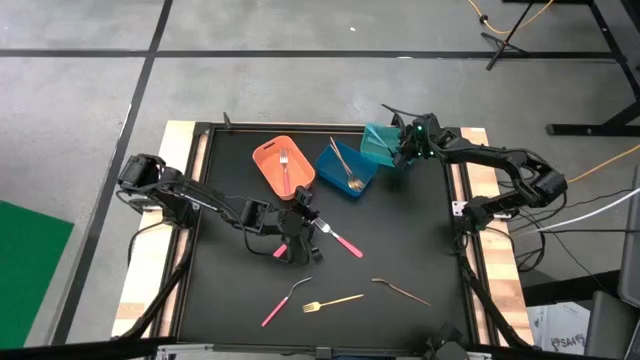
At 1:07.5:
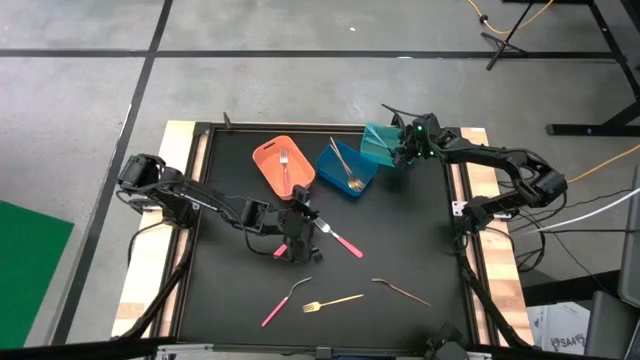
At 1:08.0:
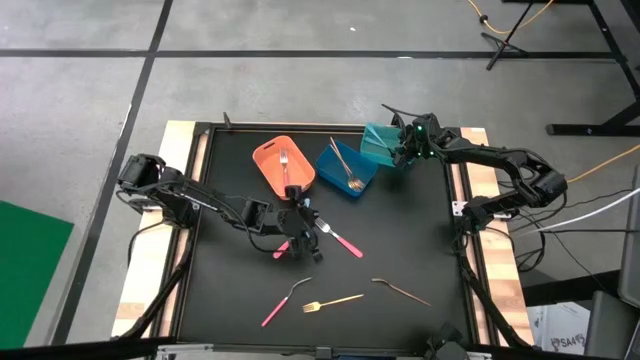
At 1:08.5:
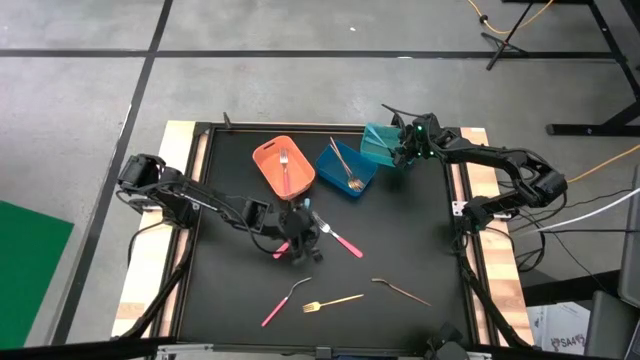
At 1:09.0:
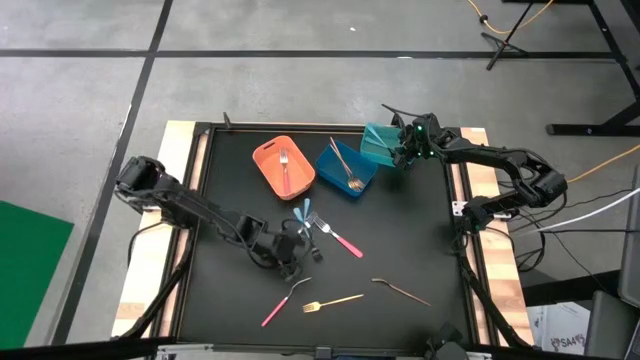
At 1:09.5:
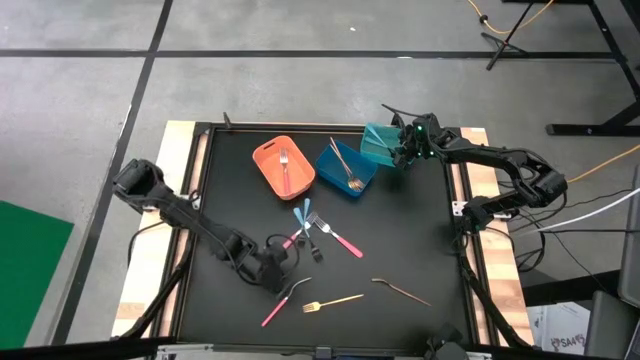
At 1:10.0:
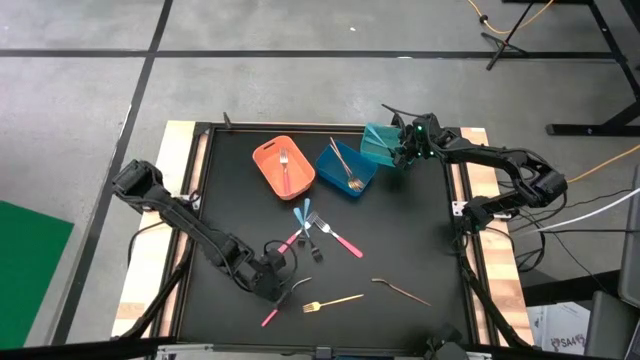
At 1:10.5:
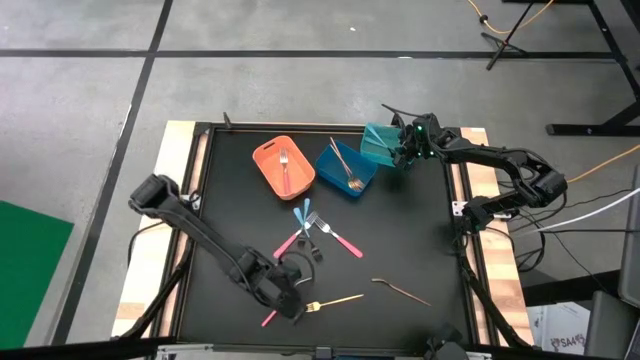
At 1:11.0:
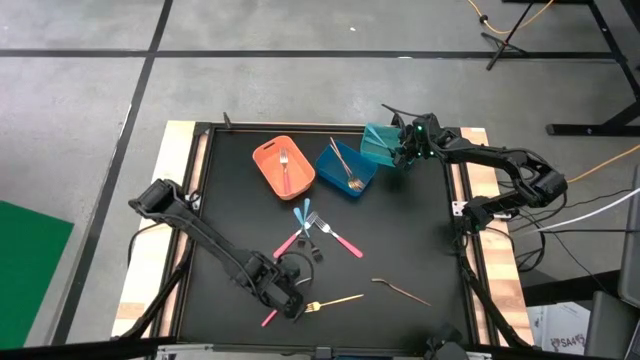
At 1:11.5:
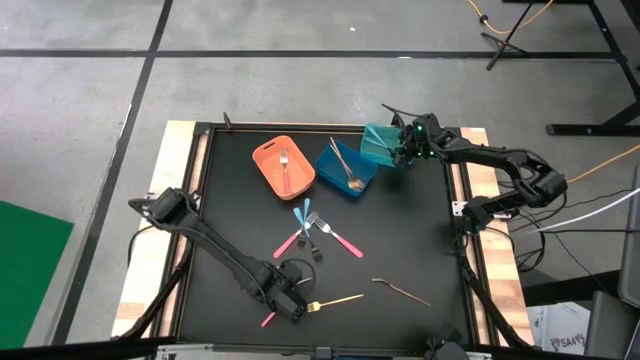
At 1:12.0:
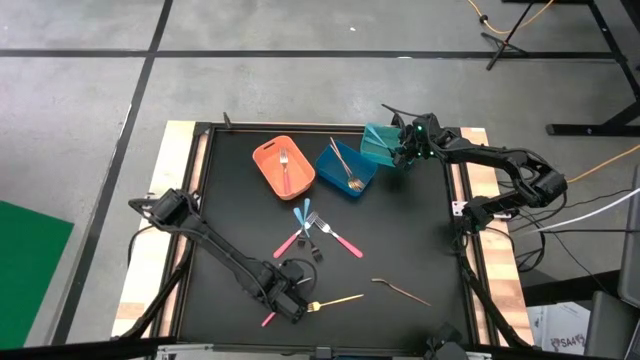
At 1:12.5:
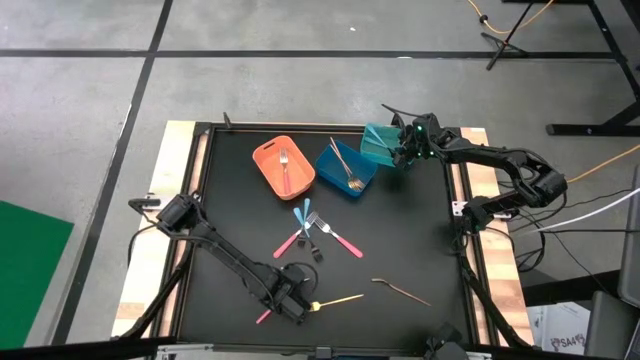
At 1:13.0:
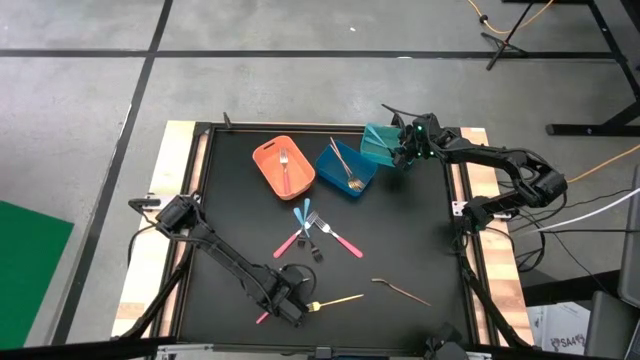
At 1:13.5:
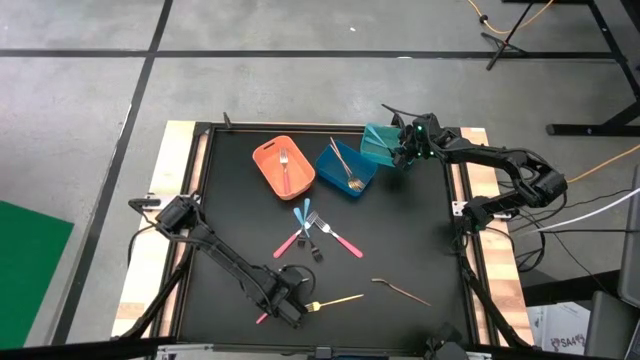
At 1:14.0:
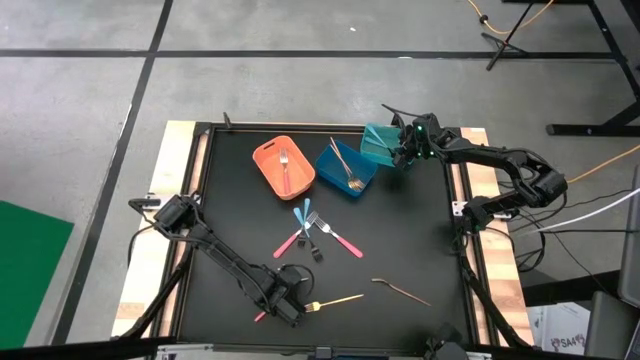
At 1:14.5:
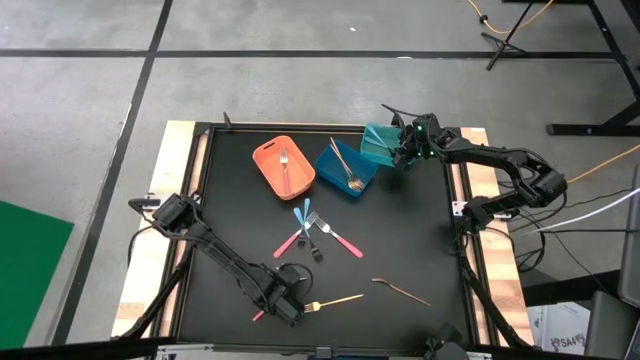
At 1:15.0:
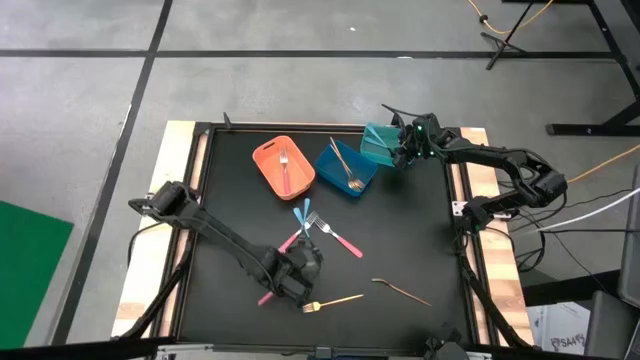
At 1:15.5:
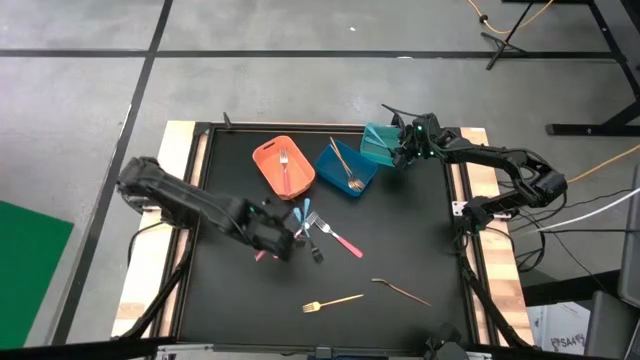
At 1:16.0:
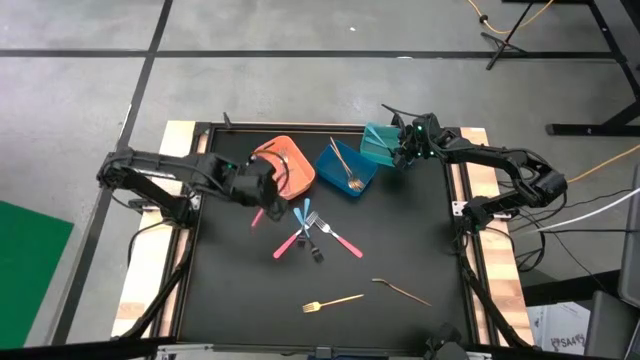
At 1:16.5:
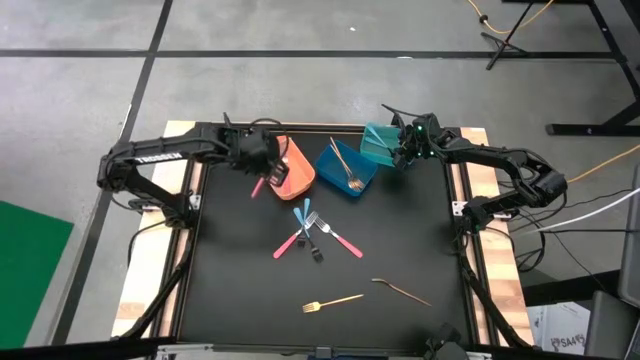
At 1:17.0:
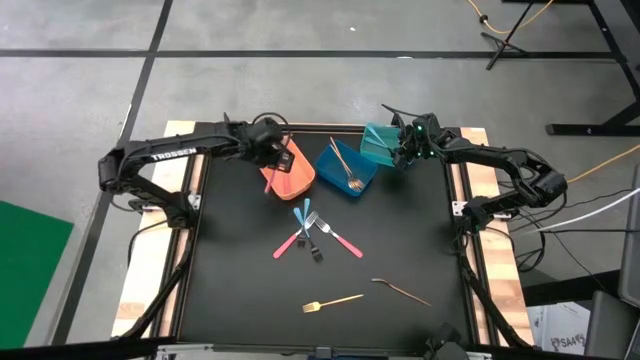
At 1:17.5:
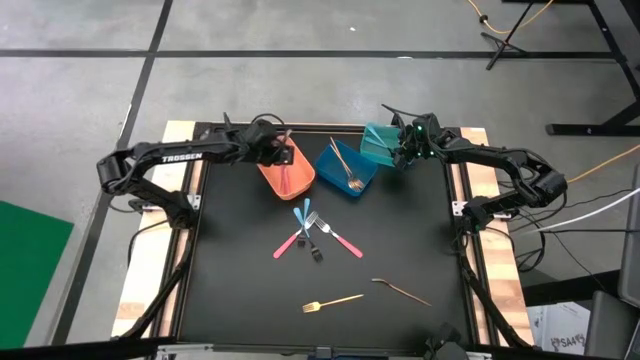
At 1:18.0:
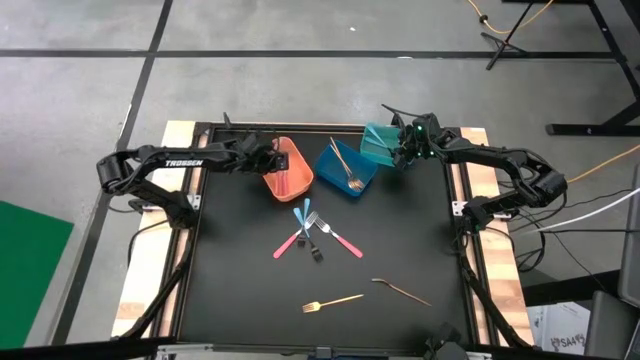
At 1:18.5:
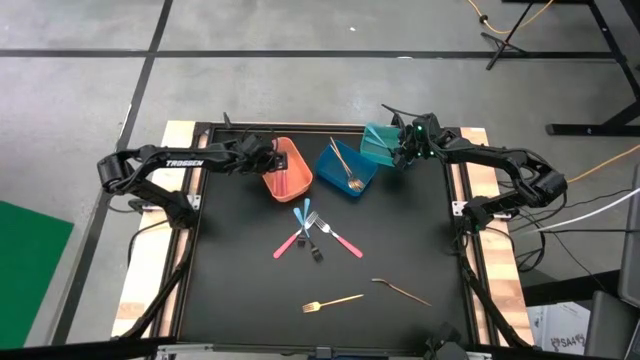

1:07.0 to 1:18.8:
Task: Sort silverware by color (type)
Put the pink fork into the orange bin

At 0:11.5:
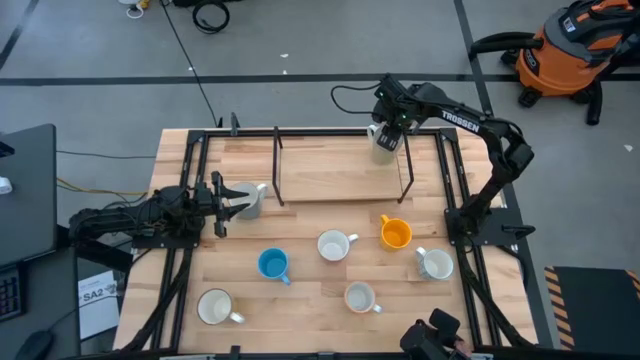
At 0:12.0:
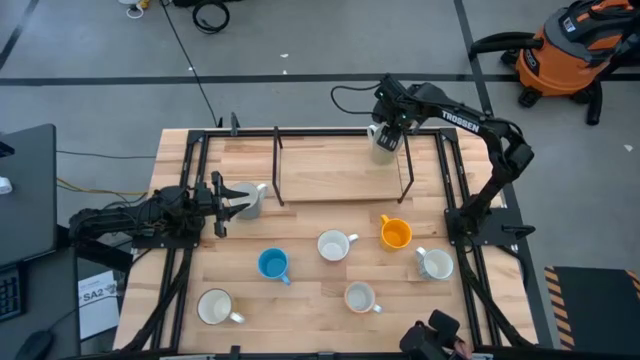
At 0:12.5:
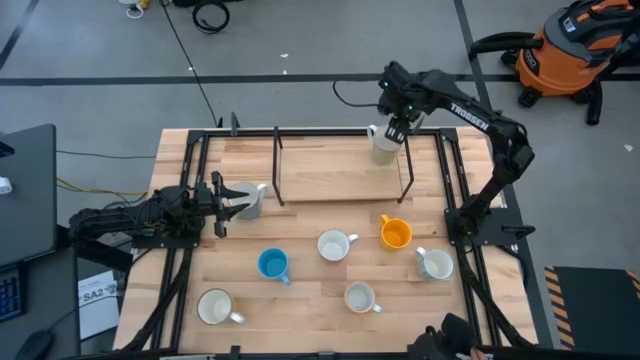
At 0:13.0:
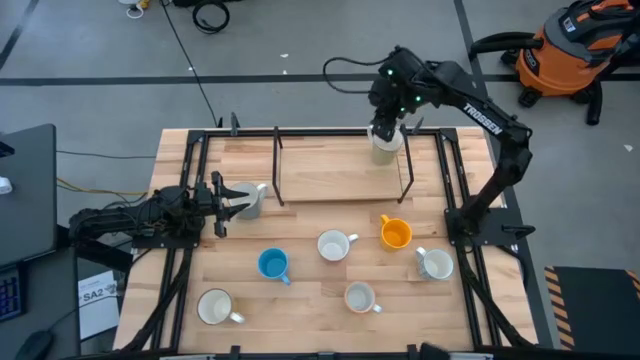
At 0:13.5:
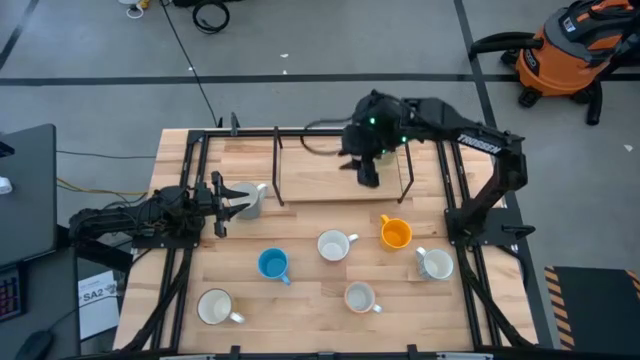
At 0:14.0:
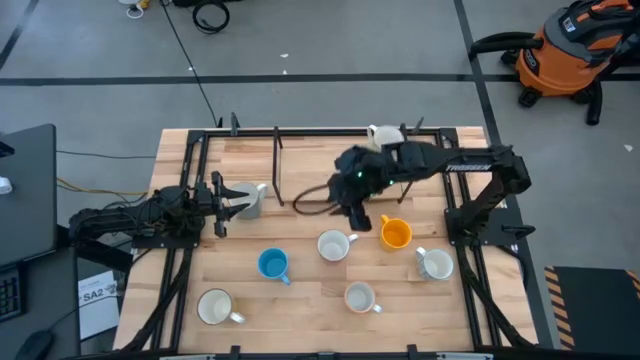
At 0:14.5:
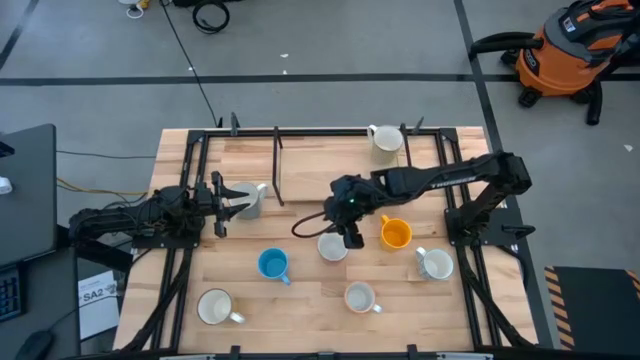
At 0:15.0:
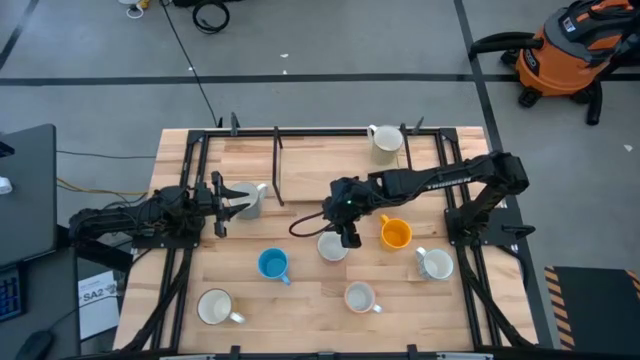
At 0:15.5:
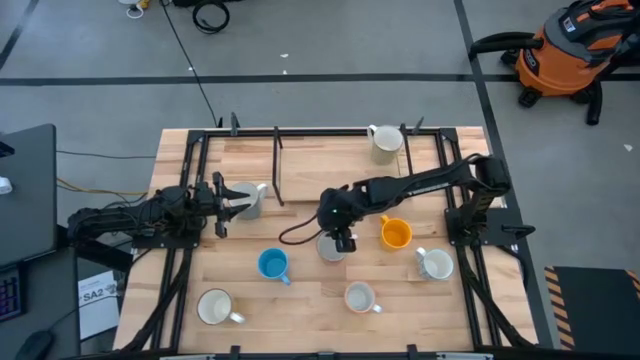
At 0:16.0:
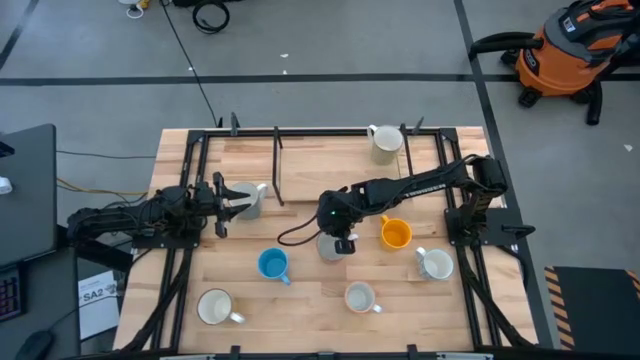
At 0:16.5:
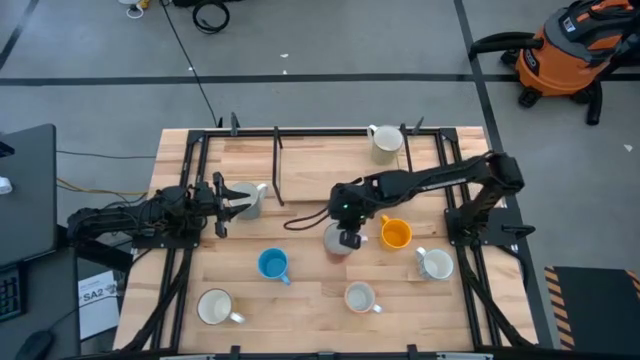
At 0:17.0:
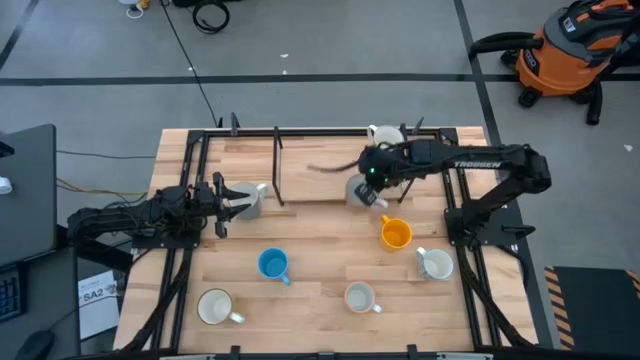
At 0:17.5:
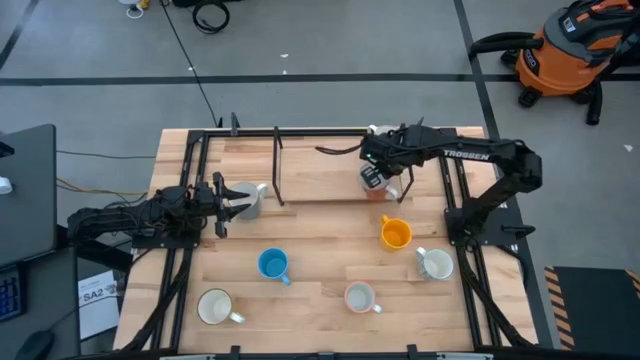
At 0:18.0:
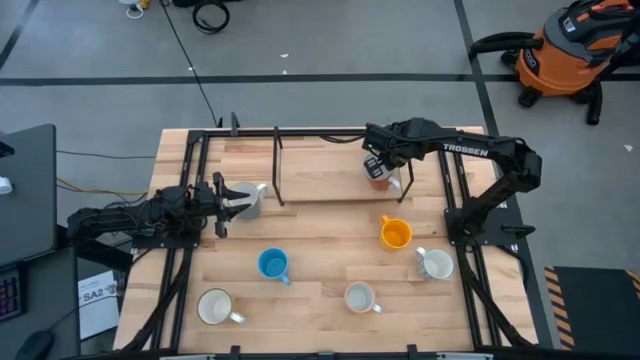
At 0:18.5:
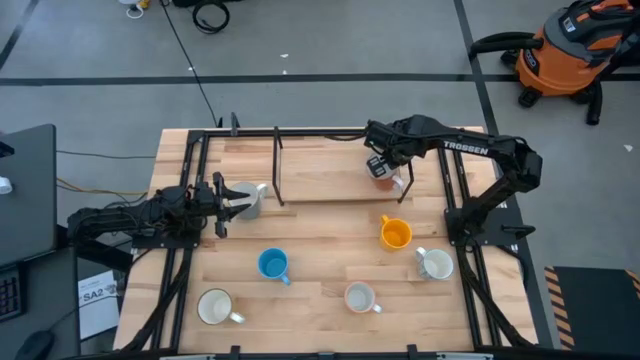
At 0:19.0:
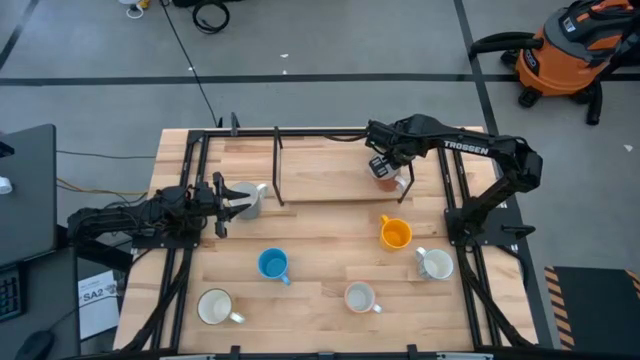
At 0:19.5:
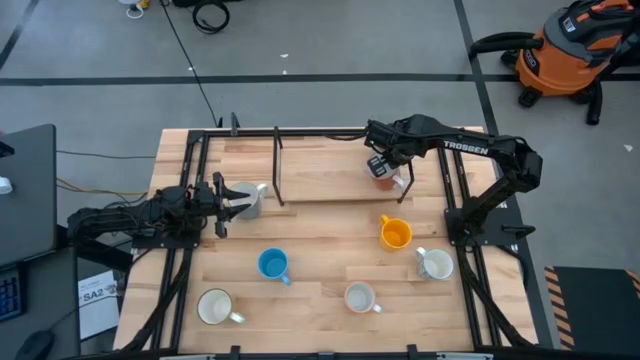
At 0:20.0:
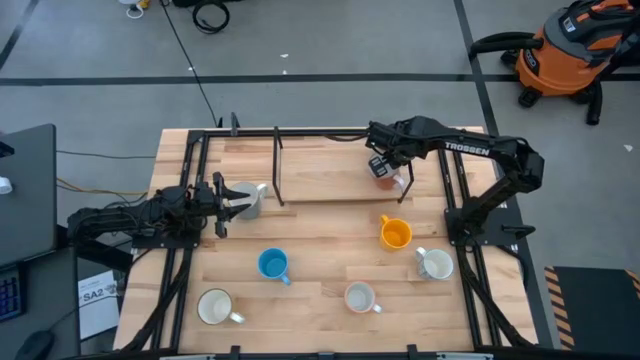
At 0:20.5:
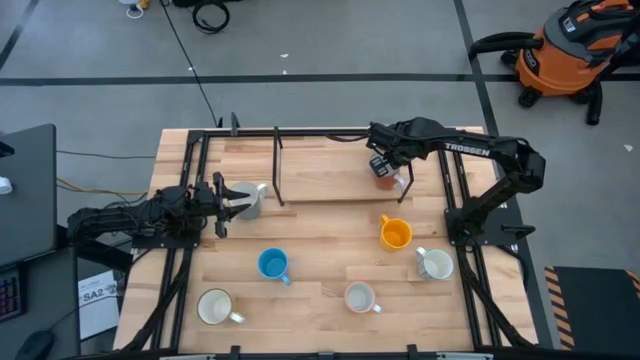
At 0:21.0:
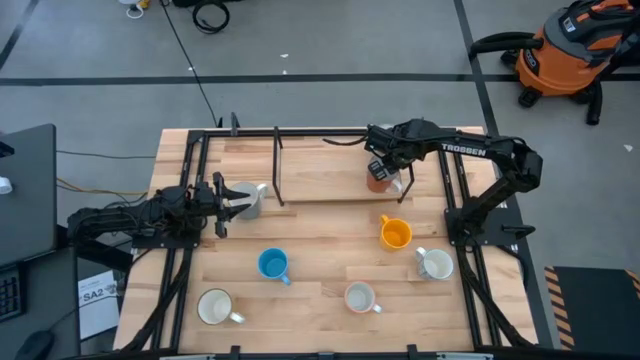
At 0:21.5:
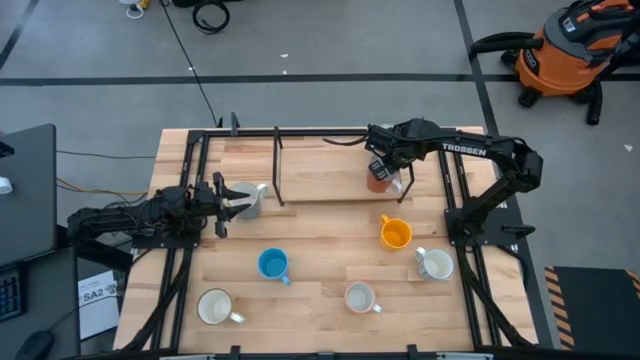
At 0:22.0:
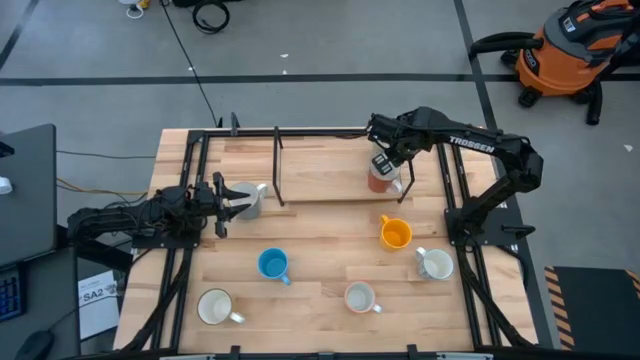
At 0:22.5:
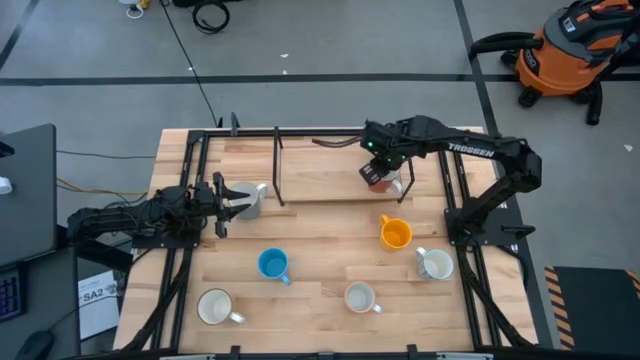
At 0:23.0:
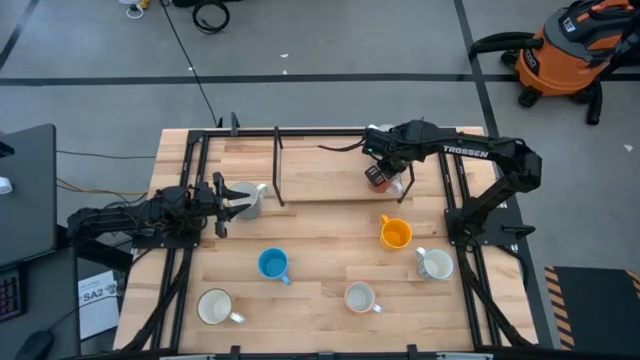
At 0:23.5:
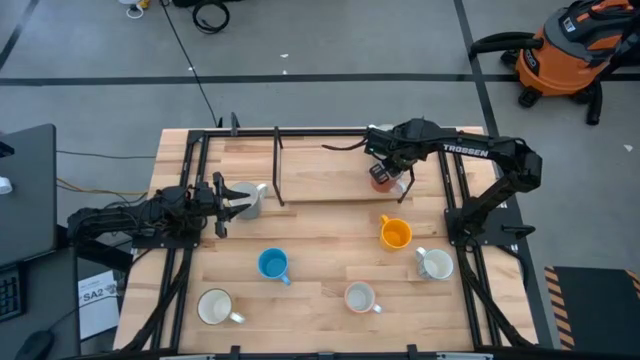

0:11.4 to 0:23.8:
Task: Place coffee mugs
Put the red cup on the shelf aligned with the green cup
